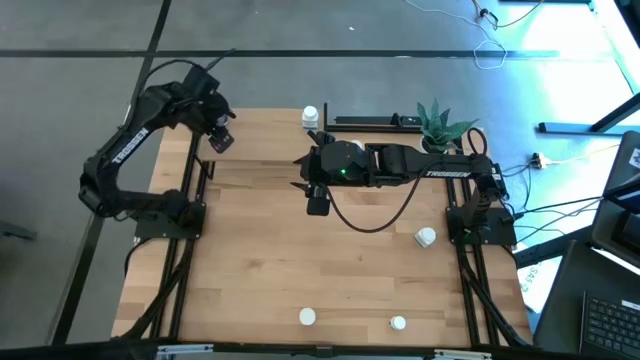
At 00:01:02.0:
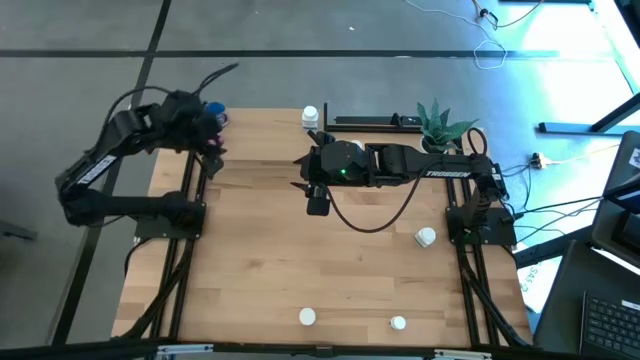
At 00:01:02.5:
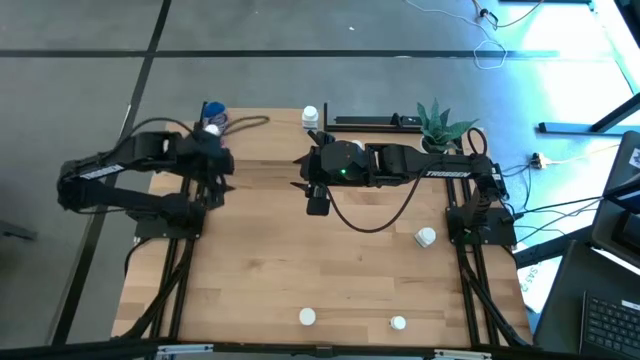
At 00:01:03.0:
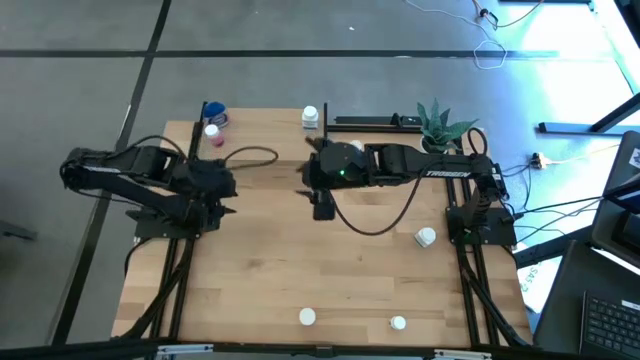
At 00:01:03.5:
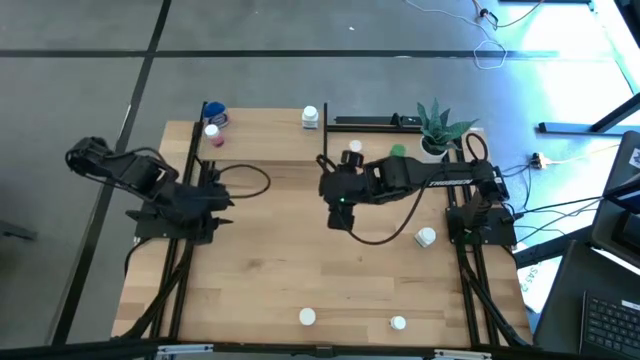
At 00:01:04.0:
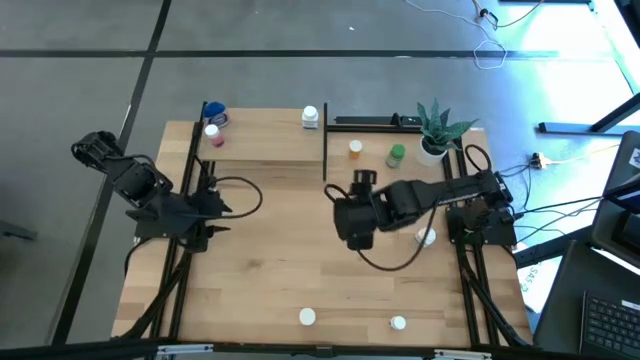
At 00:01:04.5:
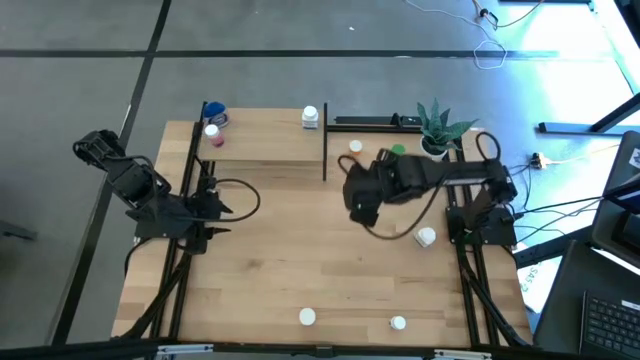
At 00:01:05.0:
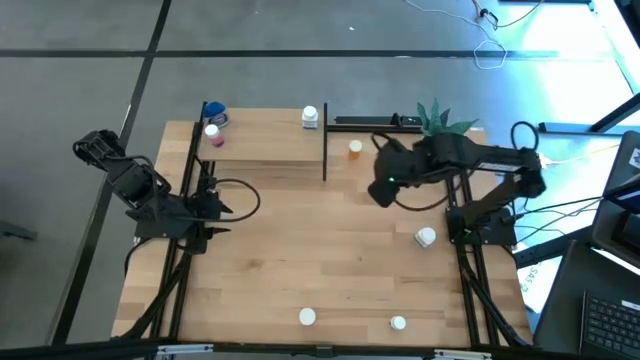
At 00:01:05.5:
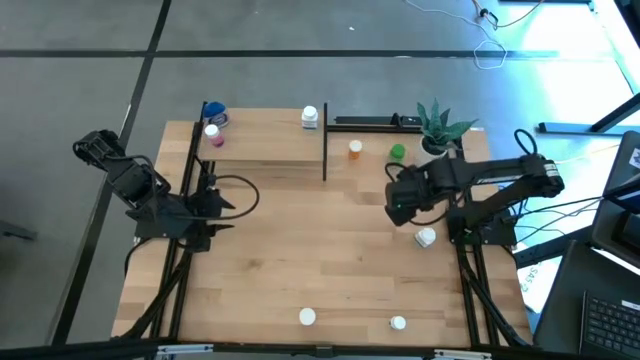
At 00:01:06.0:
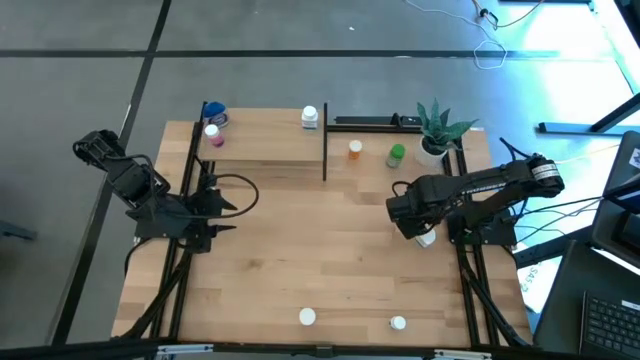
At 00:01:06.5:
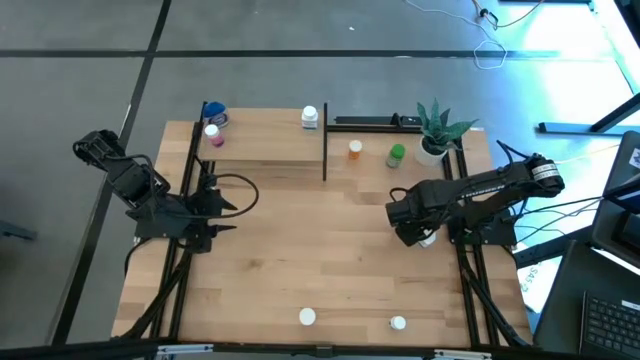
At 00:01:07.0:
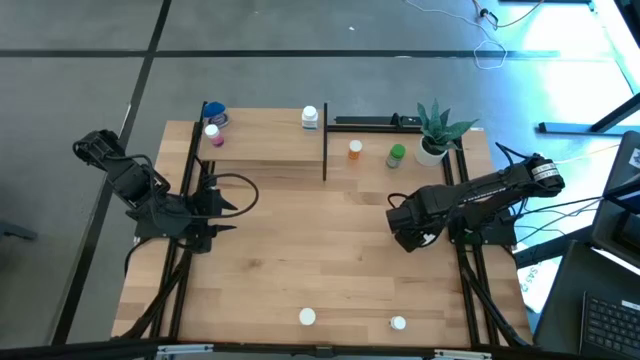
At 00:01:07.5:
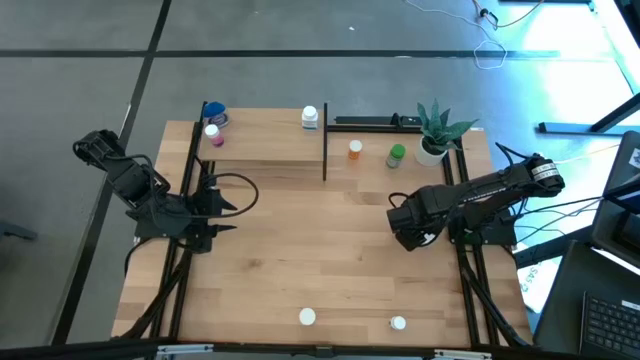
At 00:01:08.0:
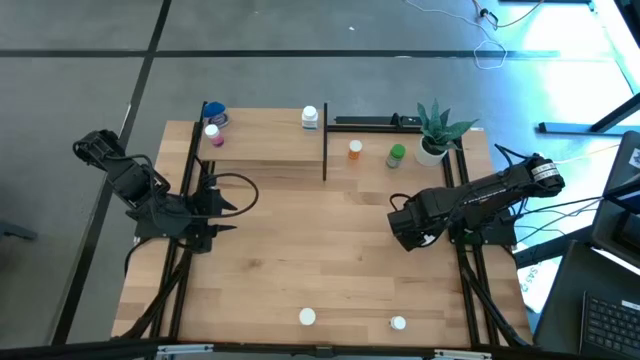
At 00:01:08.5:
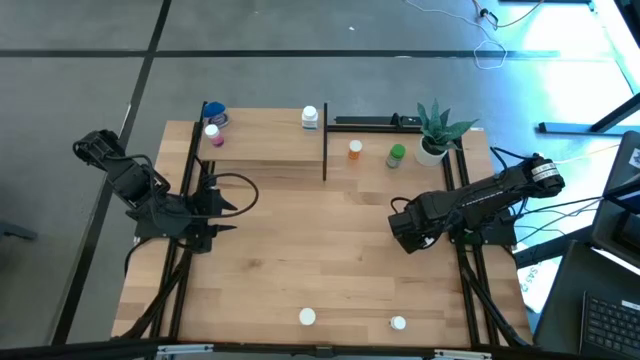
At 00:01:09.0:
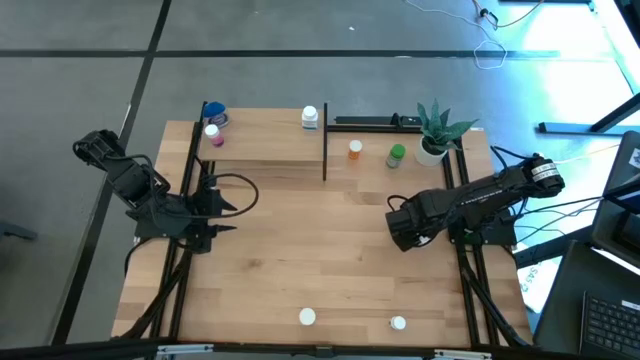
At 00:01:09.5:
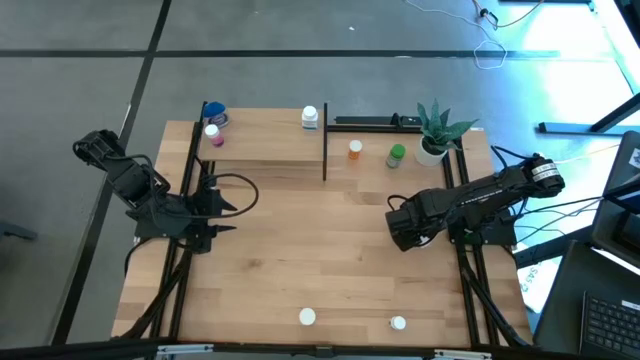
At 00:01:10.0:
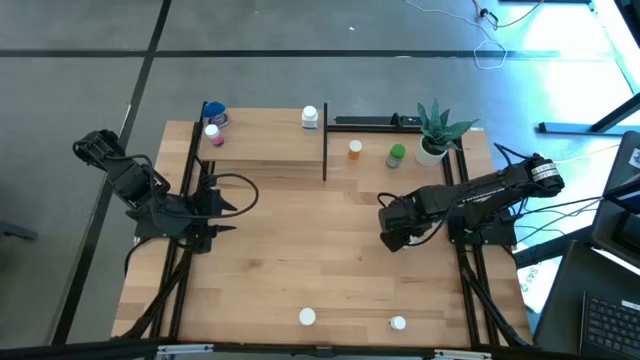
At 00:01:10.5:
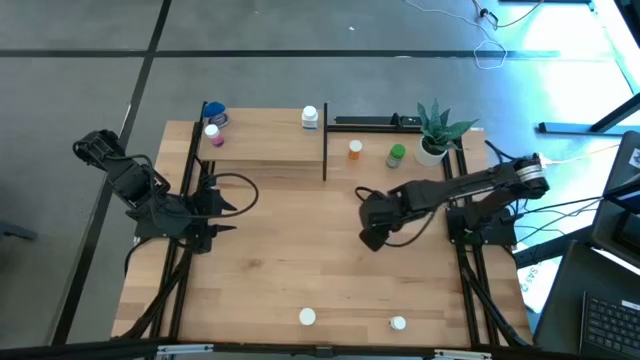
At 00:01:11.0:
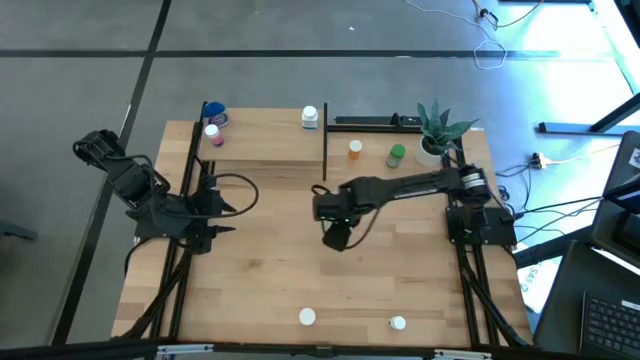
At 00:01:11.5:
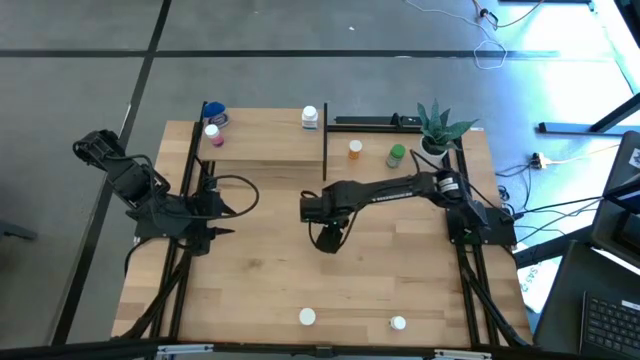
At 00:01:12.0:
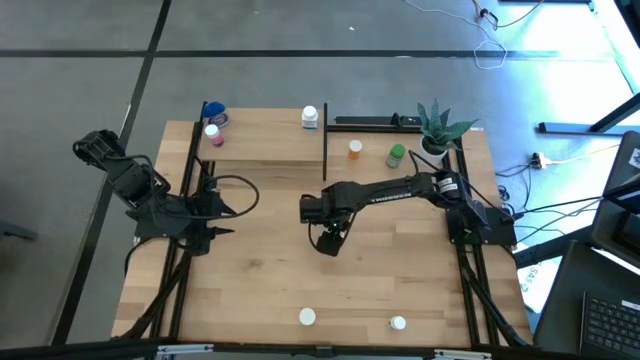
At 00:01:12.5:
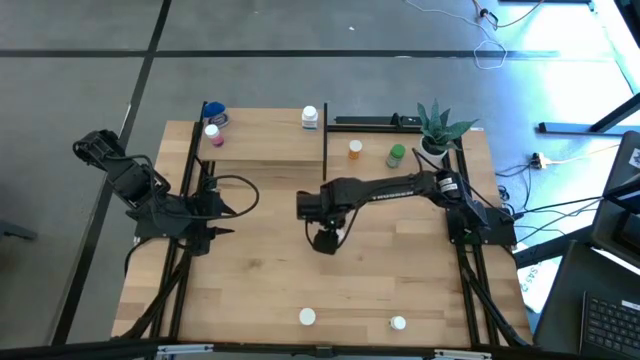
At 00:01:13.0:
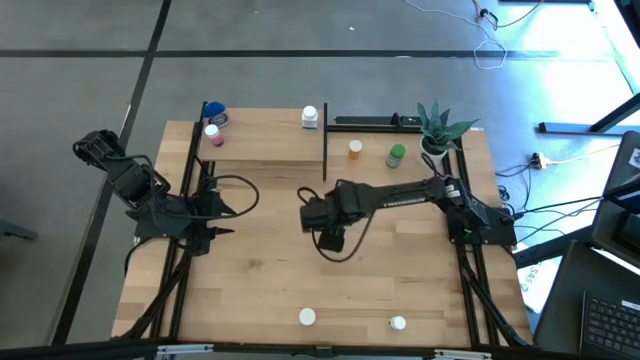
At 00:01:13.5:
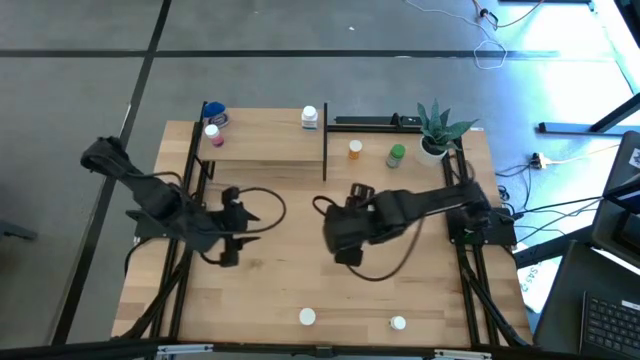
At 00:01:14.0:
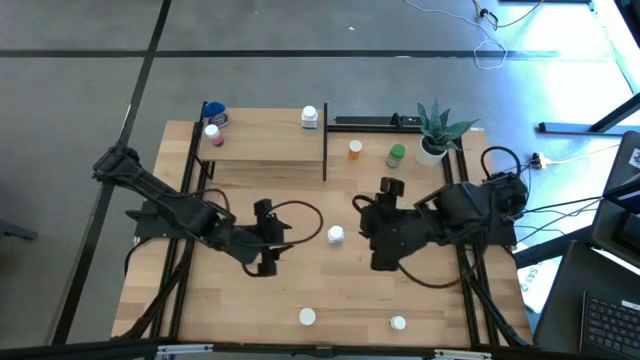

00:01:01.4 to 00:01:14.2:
Task: Pick and place medicine bottles onto shelf by color
Put the white pill bottle on the shelf

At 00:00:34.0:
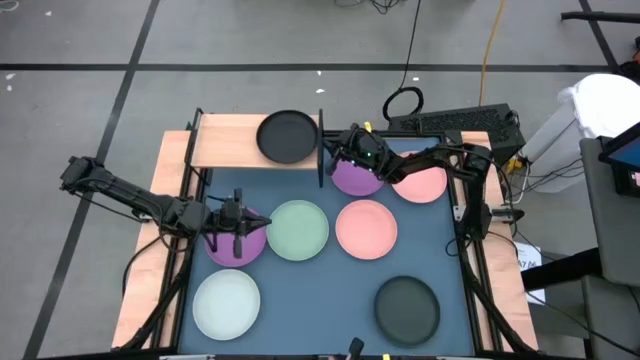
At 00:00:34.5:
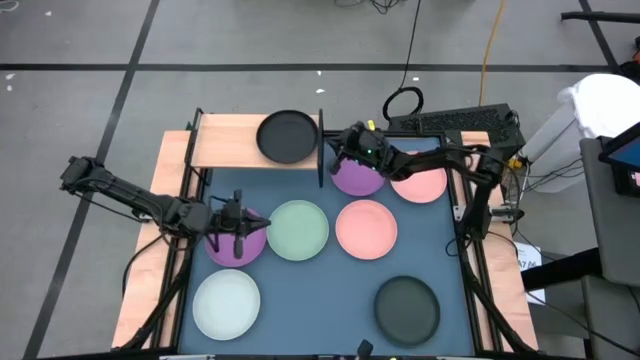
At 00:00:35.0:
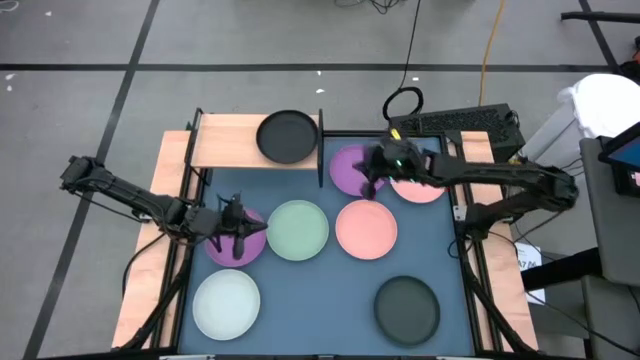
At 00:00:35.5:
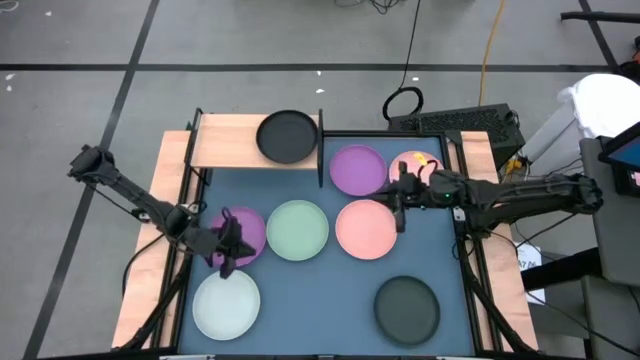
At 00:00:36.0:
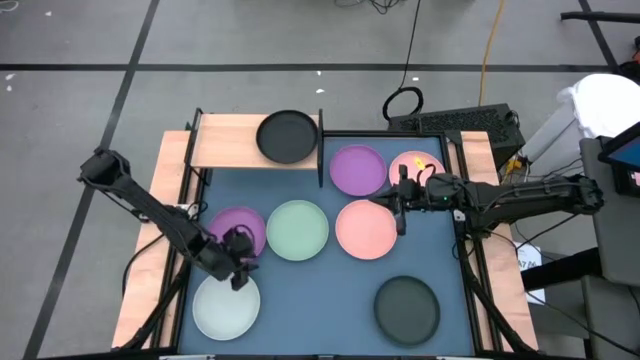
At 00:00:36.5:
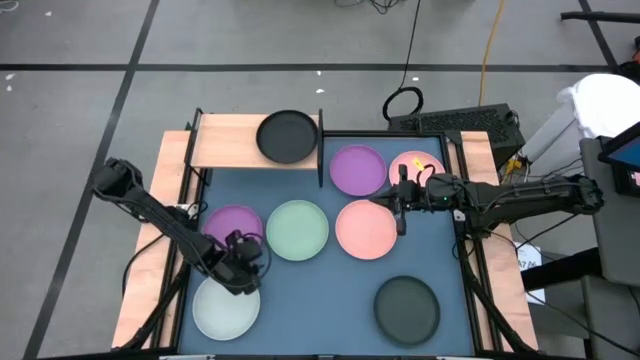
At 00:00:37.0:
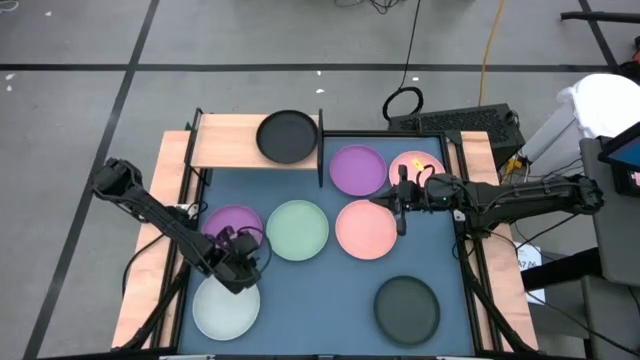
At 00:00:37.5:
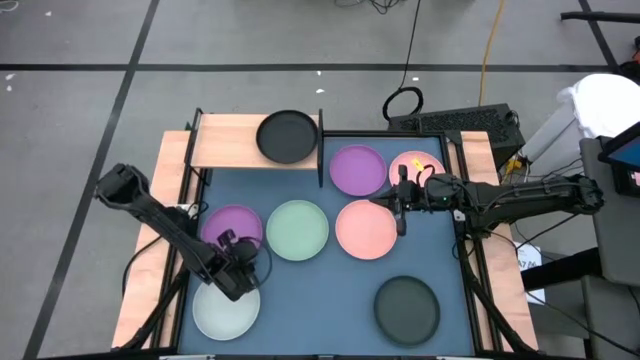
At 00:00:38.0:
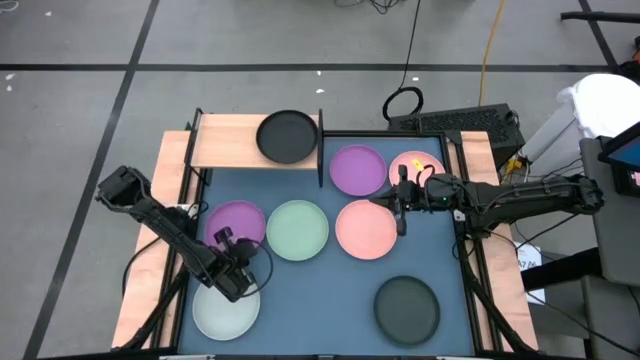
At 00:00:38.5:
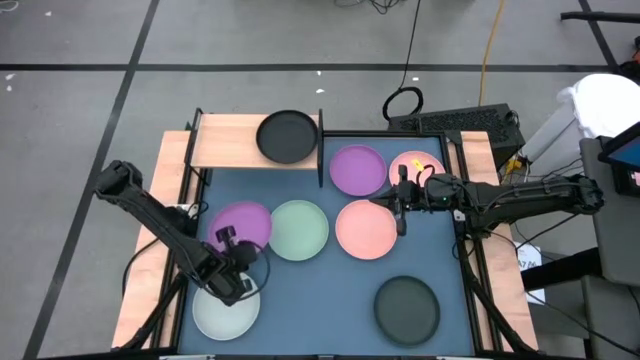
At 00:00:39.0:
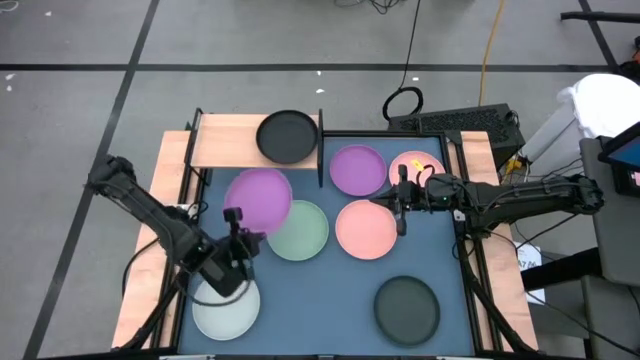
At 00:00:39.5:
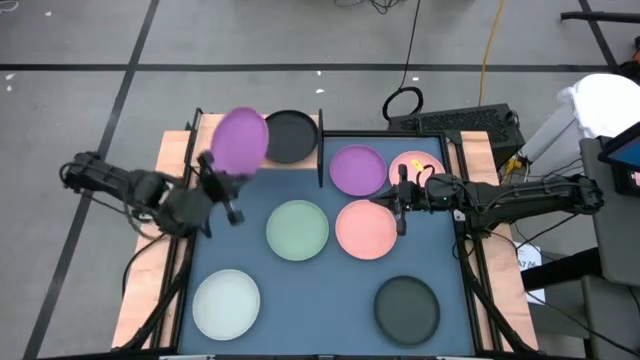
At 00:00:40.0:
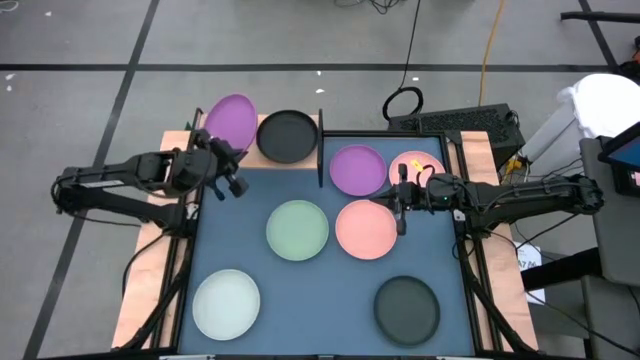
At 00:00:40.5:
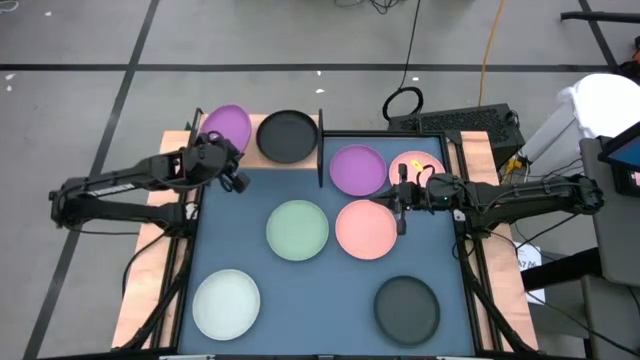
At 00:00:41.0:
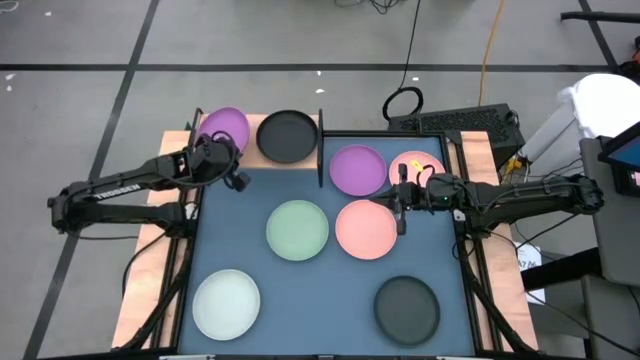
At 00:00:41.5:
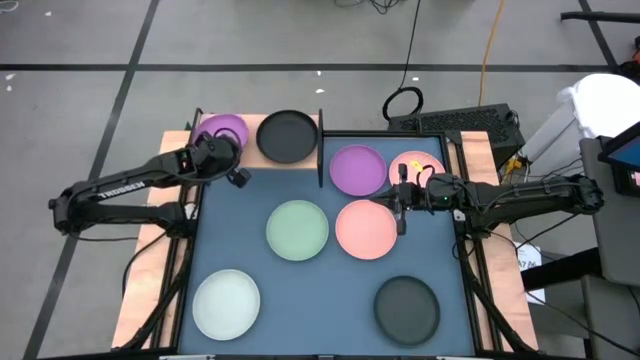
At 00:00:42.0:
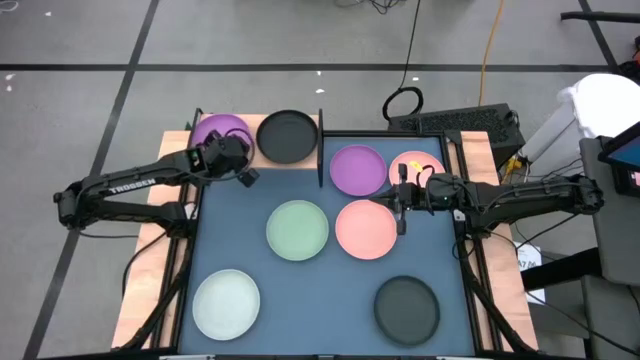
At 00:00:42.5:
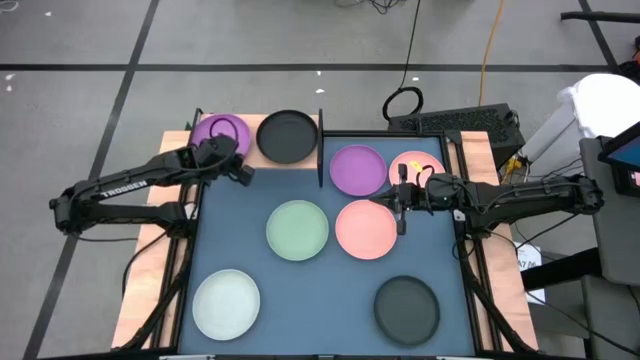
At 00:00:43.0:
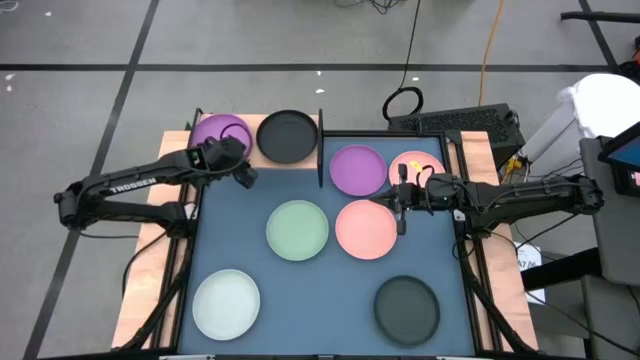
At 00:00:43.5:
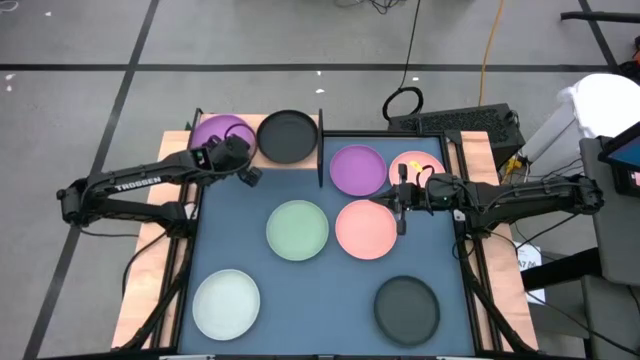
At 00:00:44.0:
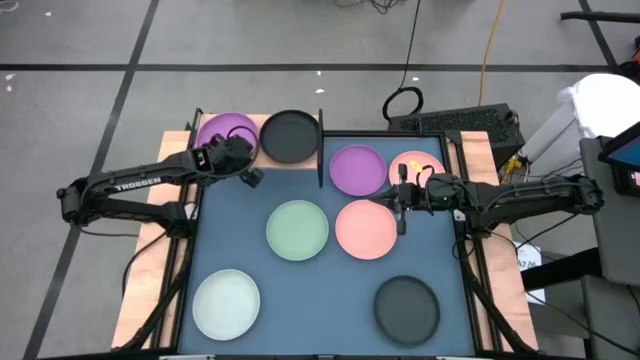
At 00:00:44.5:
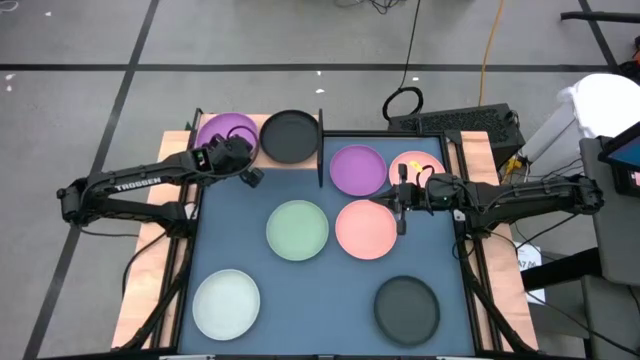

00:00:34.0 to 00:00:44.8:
Task: Place and stack plates onto a shelf
Put the left purple plate on the shelf
